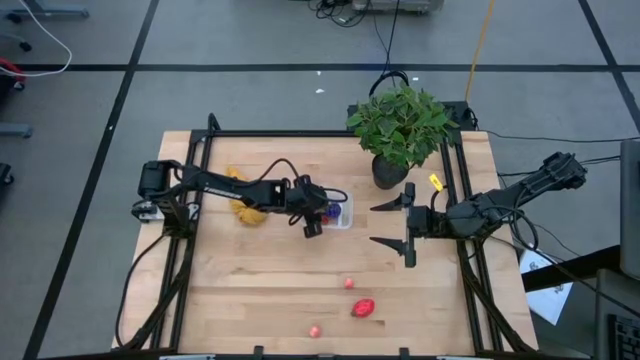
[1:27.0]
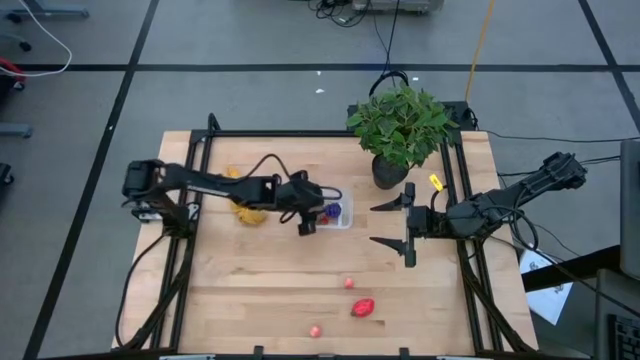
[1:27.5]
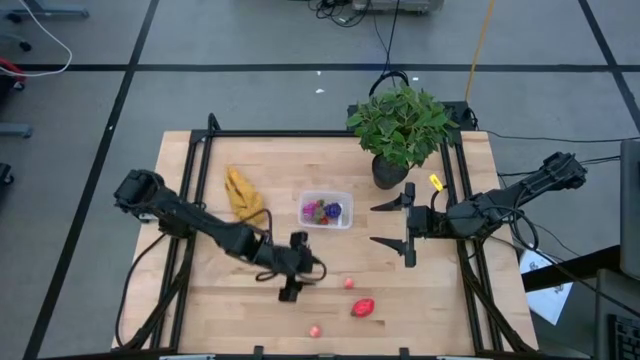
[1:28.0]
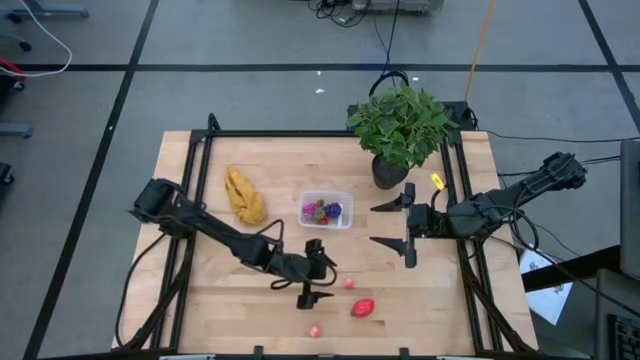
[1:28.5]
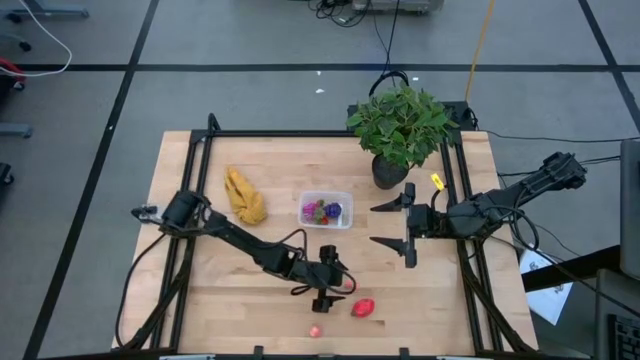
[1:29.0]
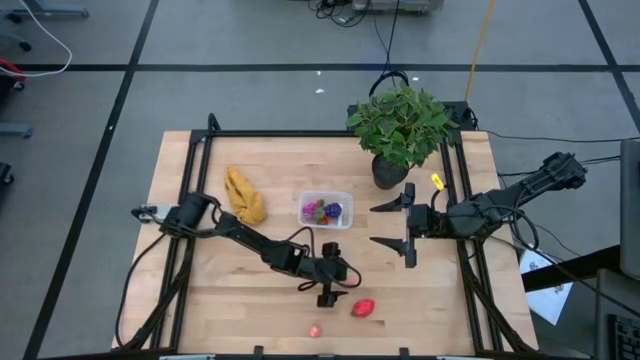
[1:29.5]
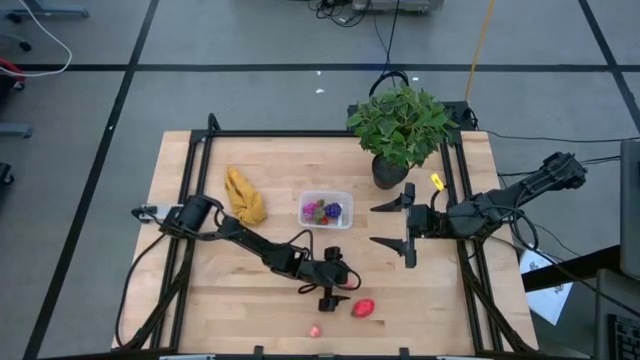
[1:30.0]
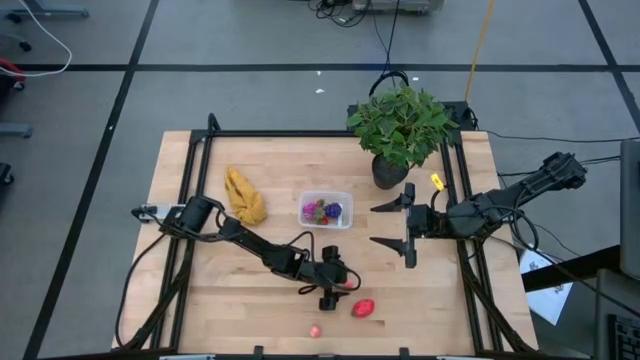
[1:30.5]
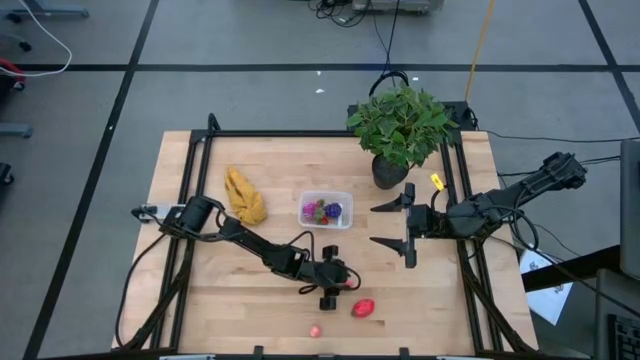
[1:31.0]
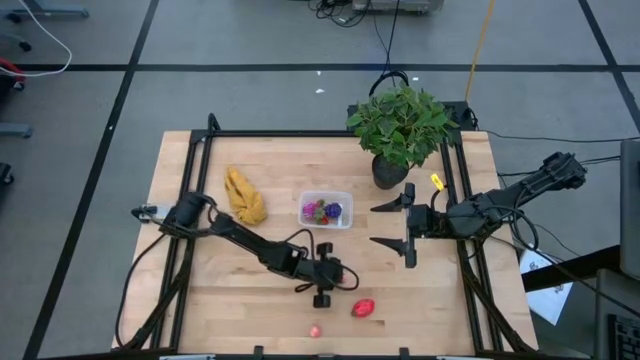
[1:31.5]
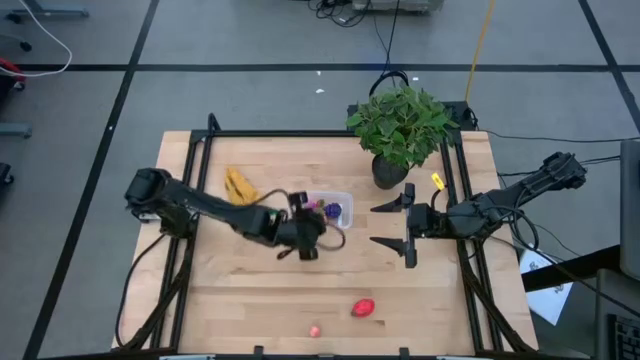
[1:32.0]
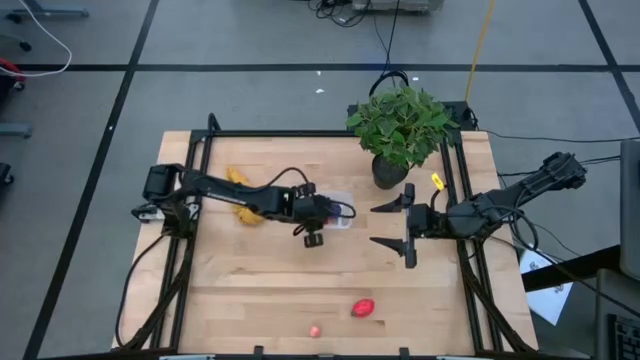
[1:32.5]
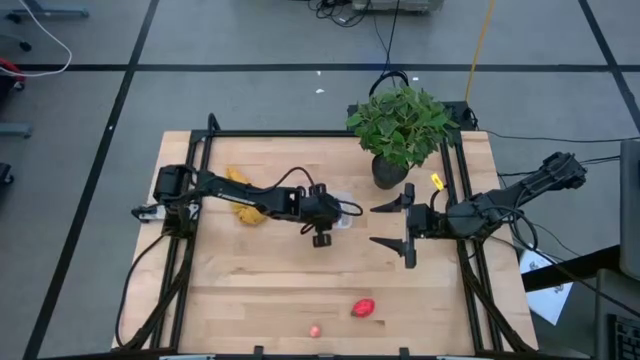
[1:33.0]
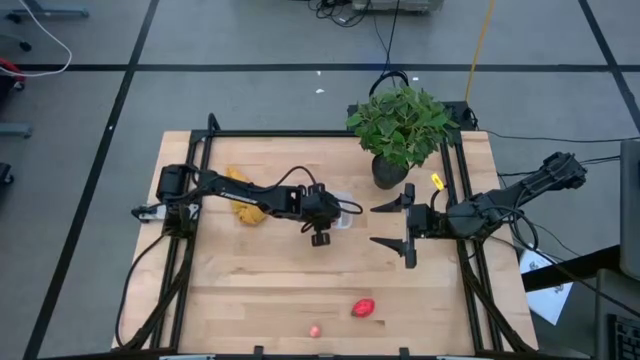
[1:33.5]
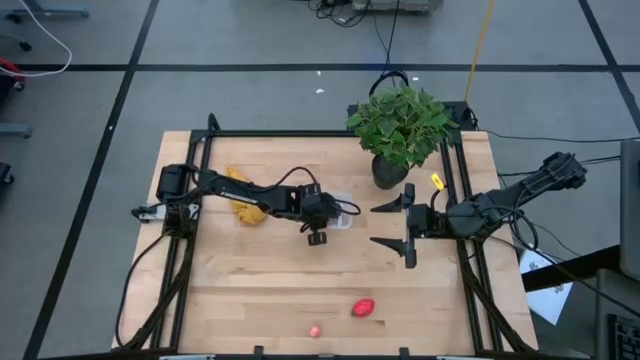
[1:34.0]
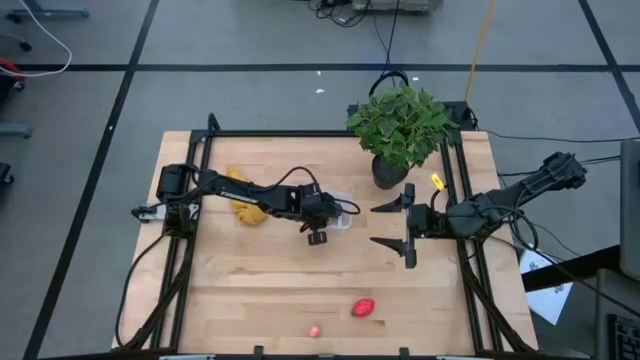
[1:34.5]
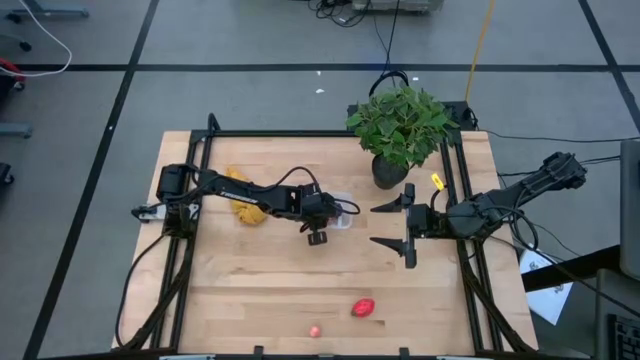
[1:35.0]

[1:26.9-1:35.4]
Task: Pick and placing Produce into tupperware
Put the top pink peach into the transparent bin

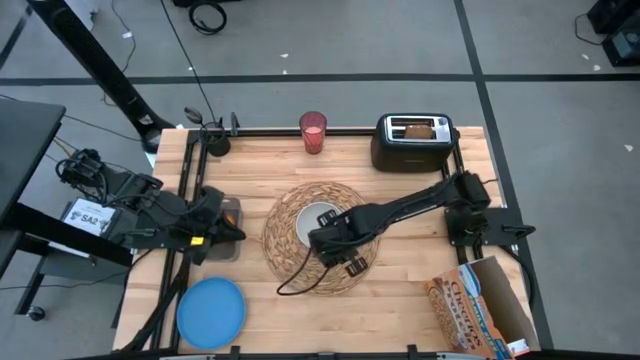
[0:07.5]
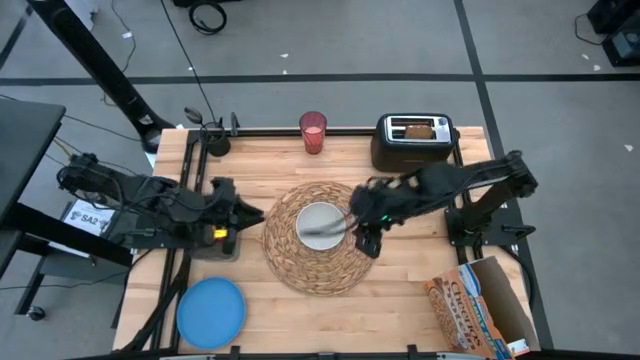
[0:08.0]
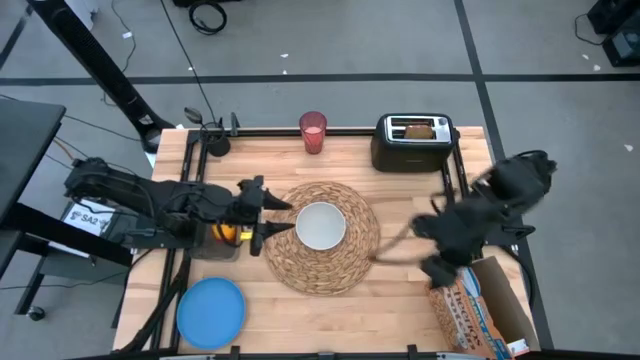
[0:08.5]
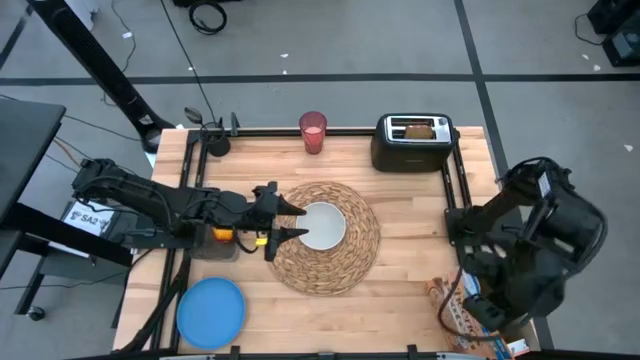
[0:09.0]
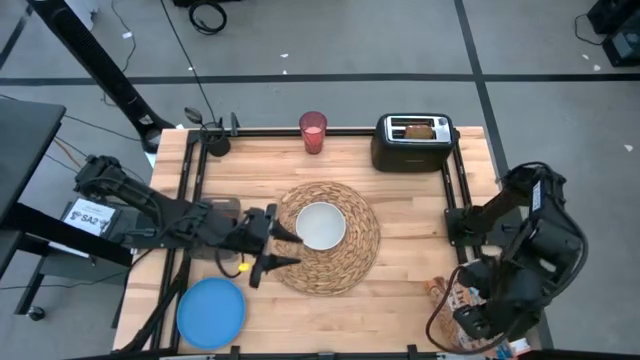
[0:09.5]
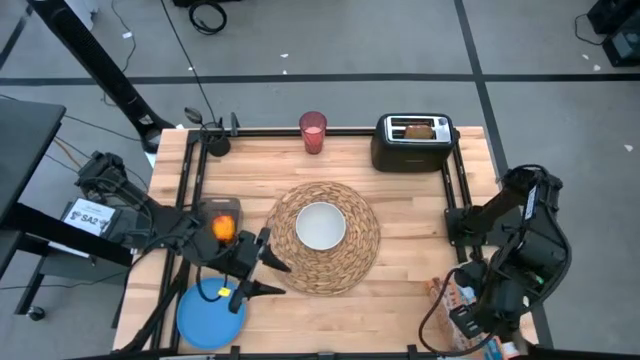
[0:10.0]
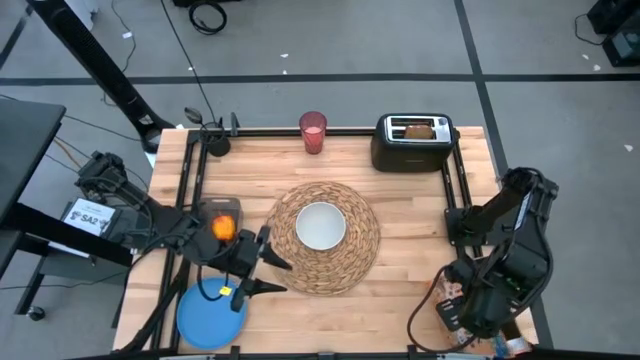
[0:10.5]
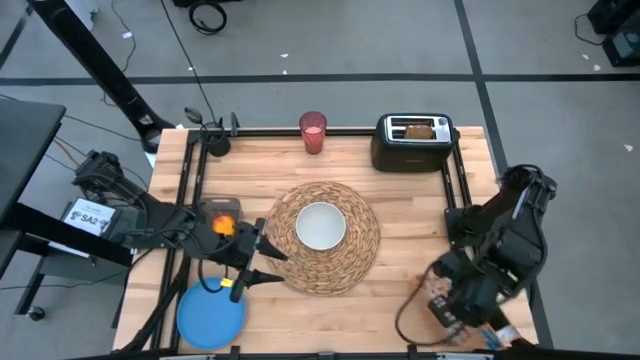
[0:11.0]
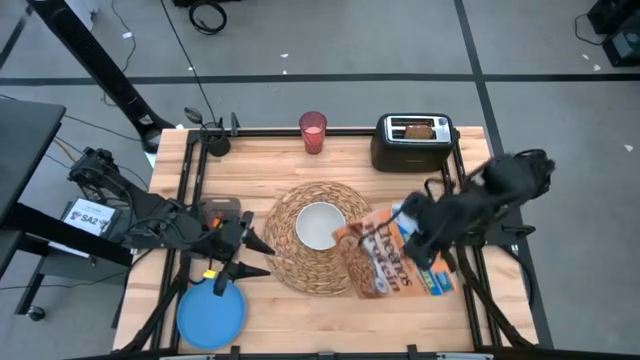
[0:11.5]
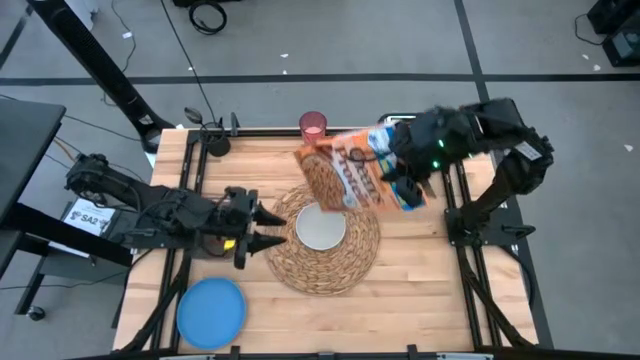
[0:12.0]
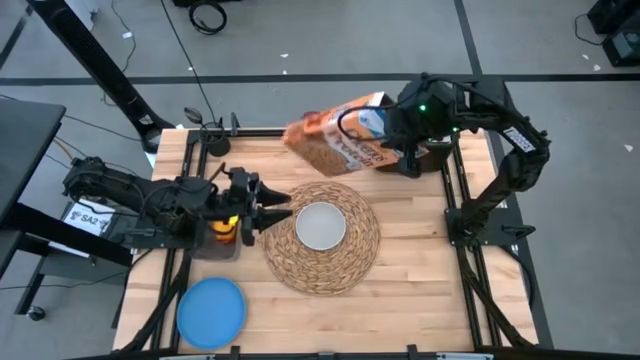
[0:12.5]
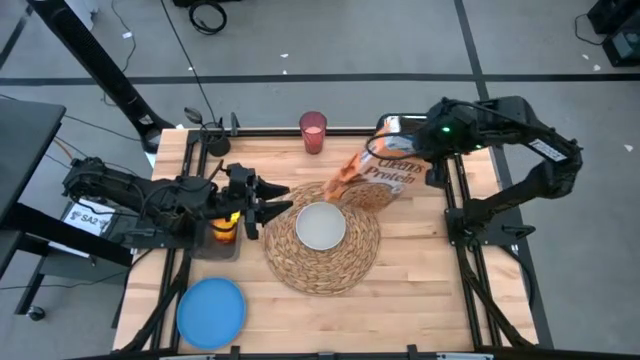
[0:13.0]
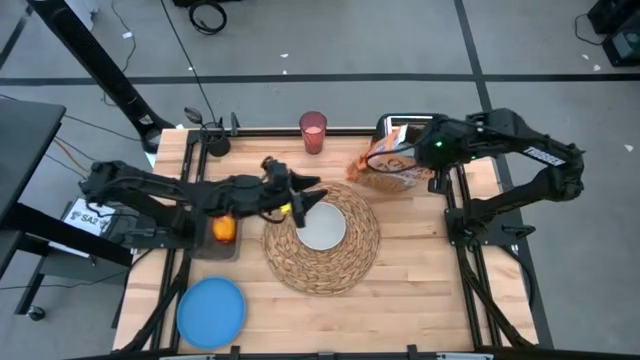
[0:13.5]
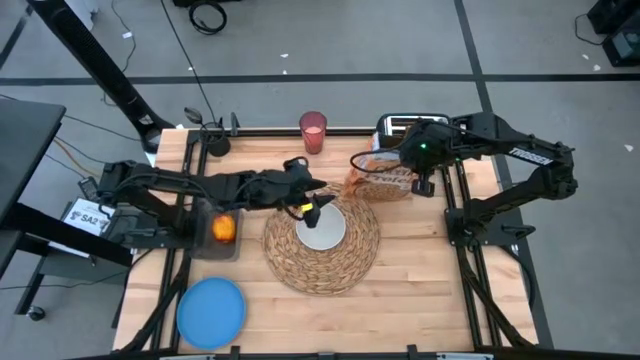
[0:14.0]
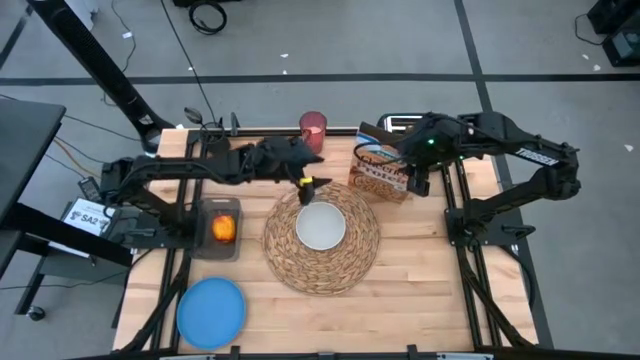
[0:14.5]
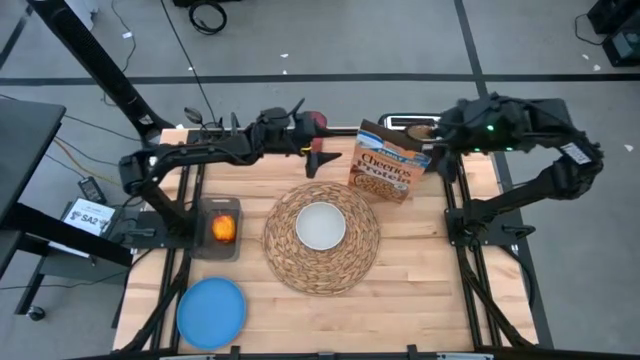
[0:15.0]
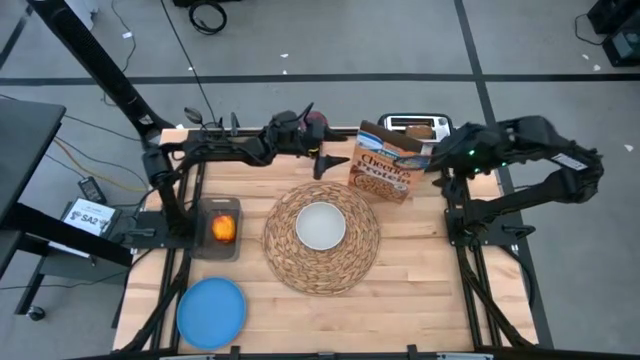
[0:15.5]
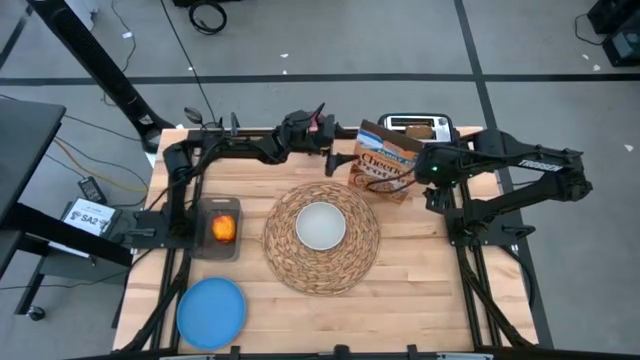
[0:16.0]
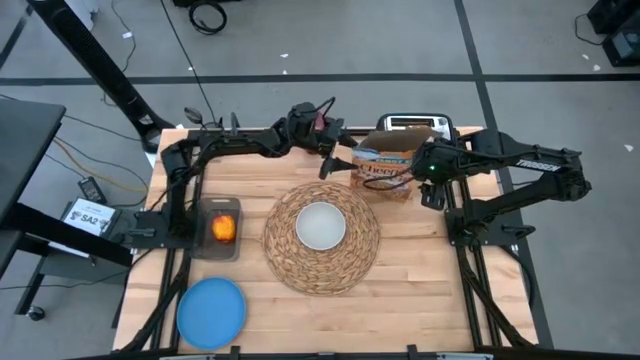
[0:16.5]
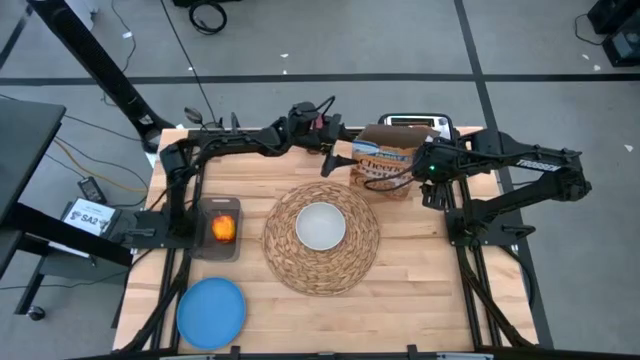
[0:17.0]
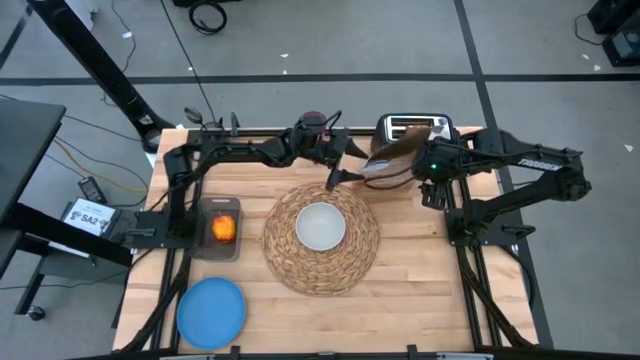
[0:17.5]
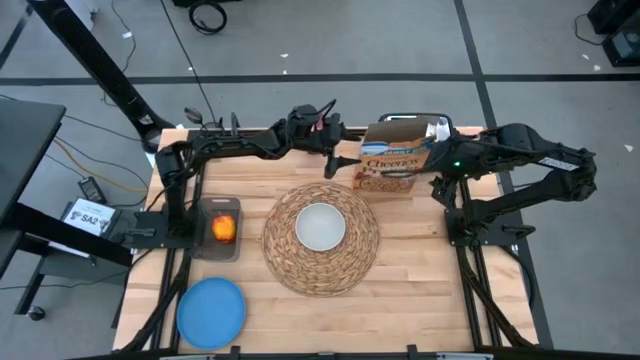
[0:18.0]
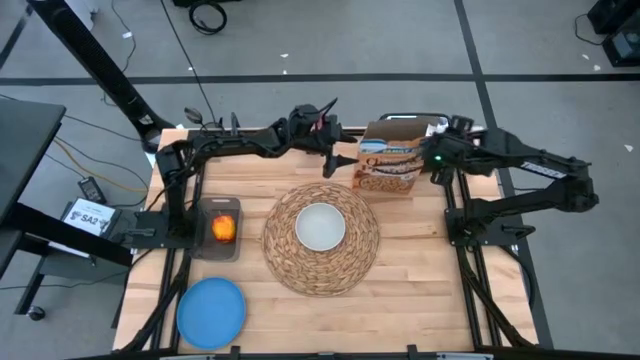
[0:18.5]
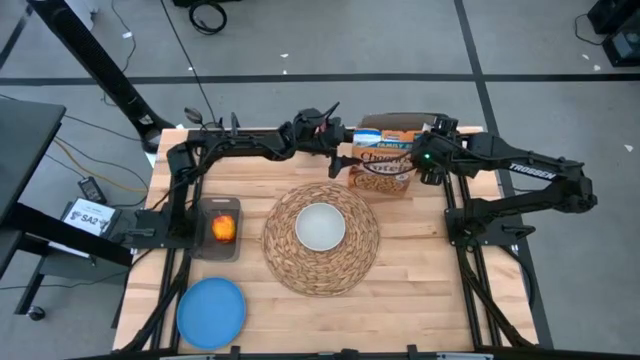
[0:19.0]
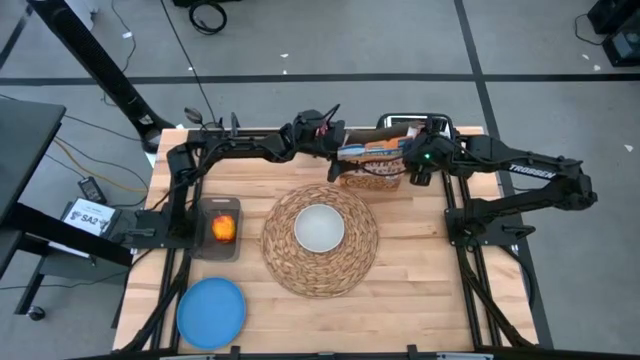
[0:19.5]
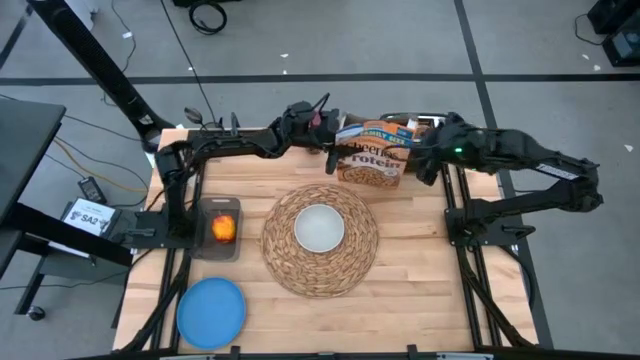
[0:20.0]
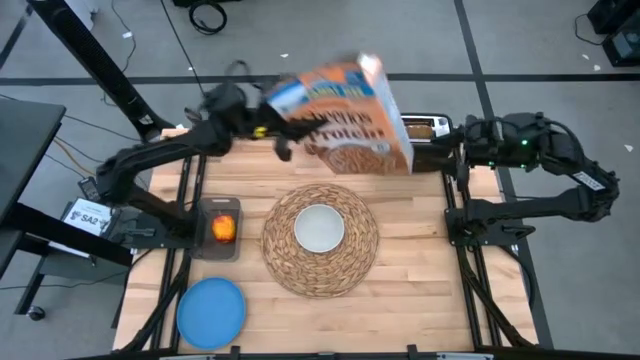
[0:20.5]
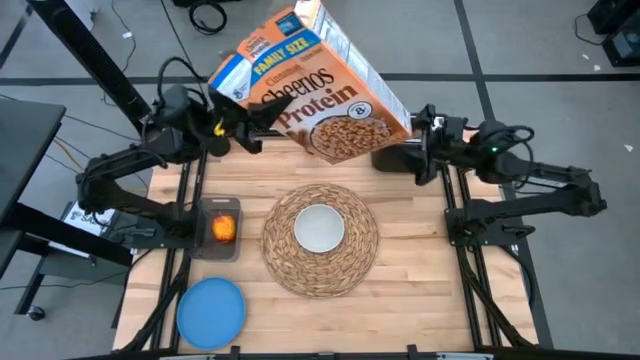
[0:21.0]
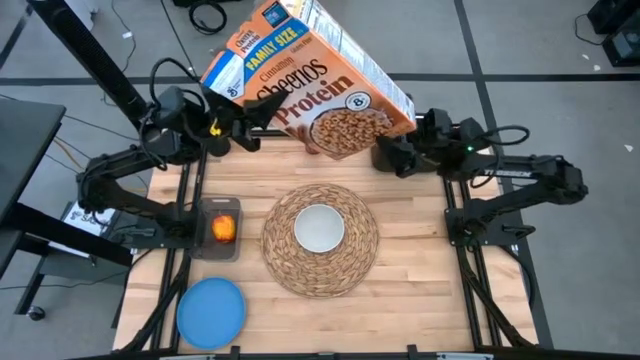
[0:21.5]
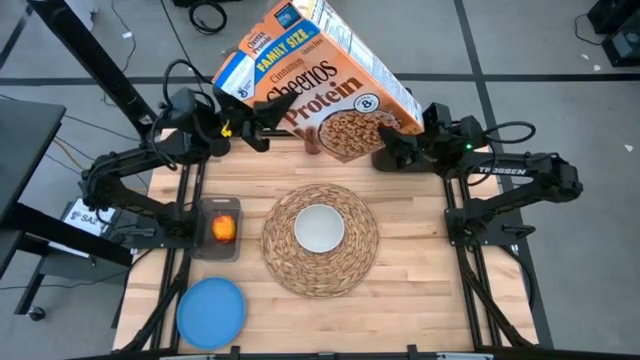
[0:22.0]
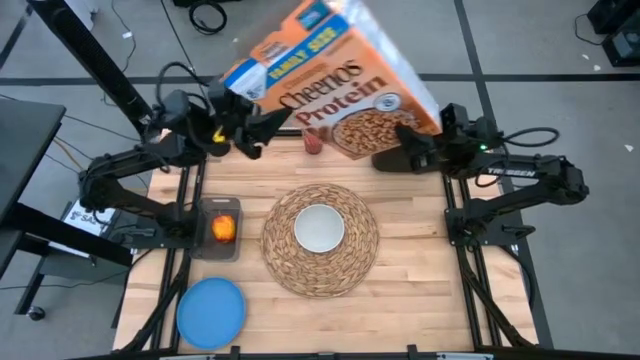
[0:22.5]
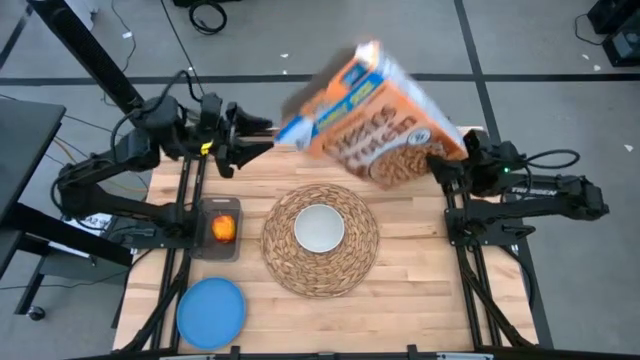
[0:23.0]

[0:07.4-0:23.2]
Task: Arrange a breakfast setting
Pour the cereal into the white bowl
